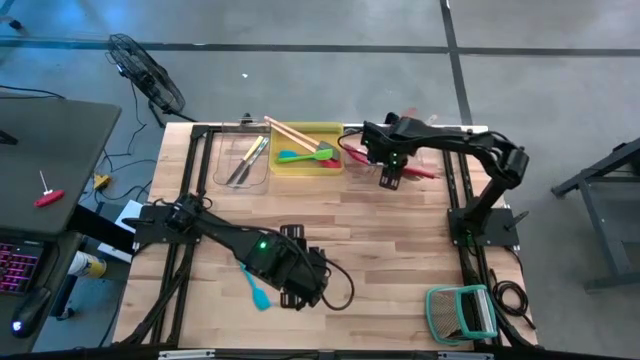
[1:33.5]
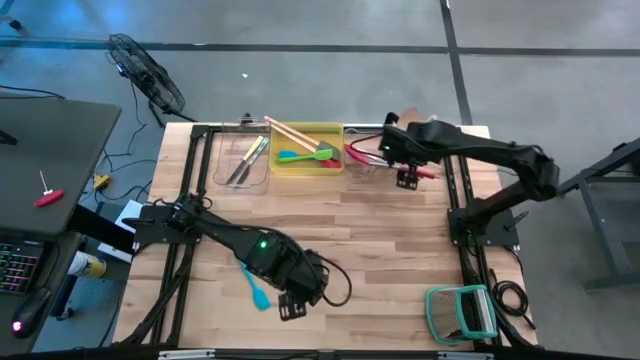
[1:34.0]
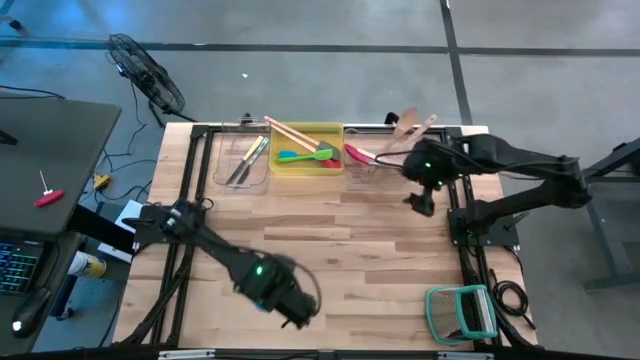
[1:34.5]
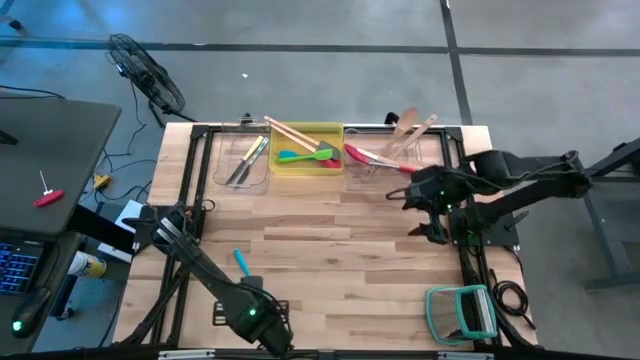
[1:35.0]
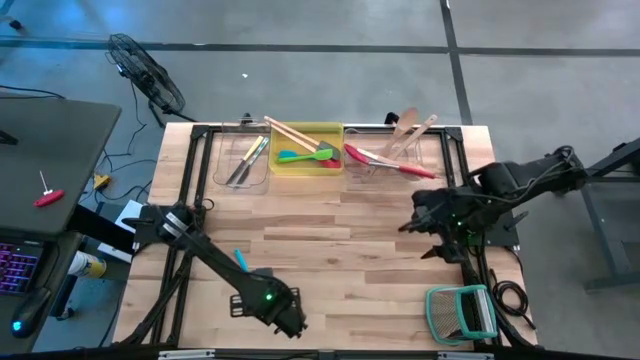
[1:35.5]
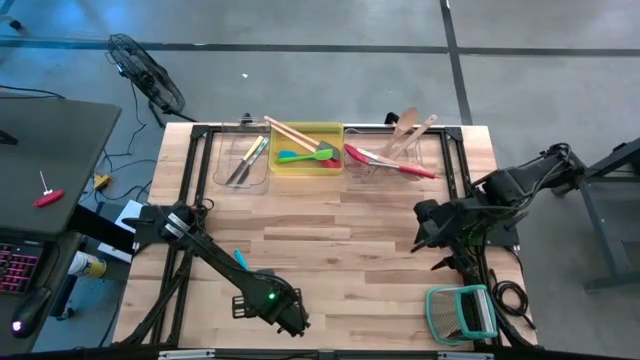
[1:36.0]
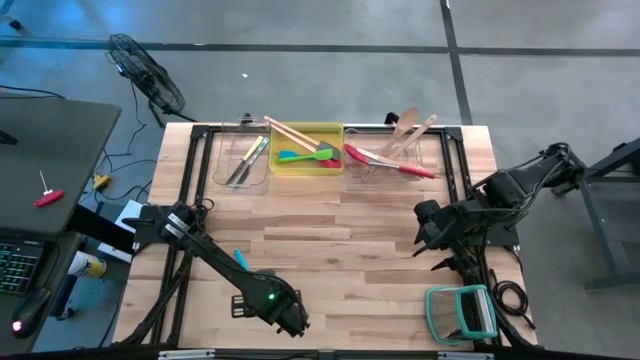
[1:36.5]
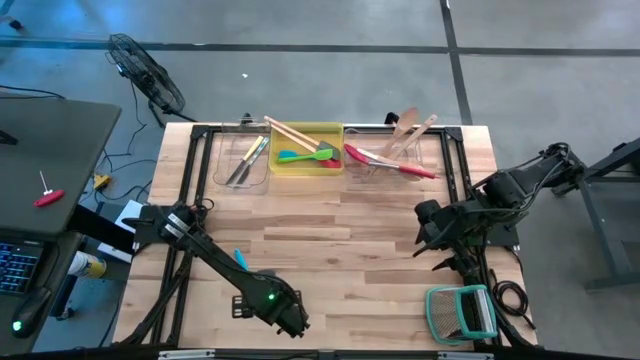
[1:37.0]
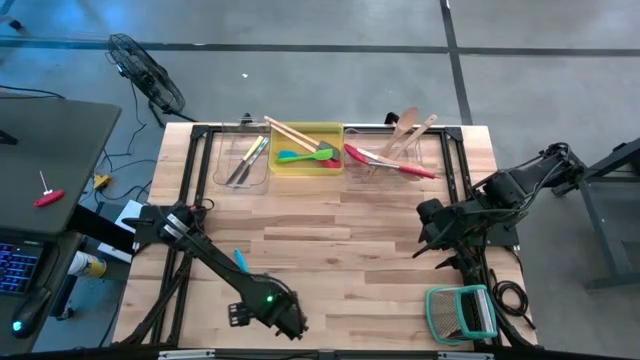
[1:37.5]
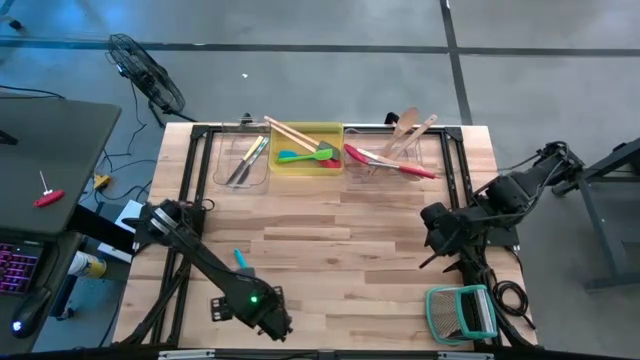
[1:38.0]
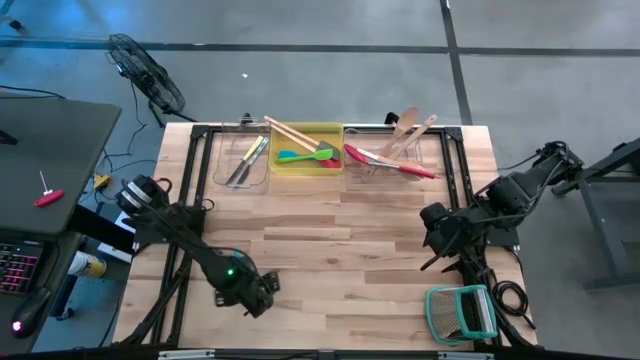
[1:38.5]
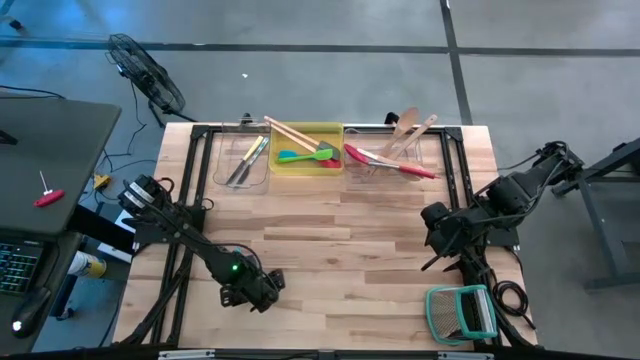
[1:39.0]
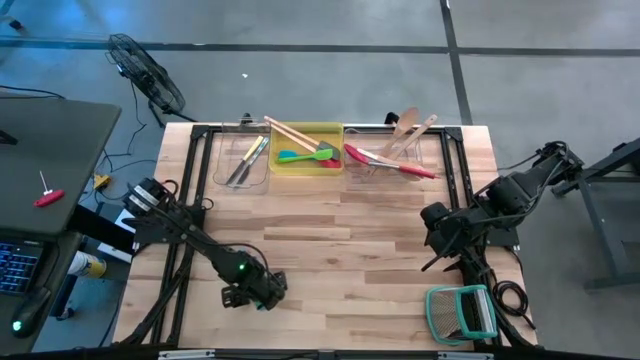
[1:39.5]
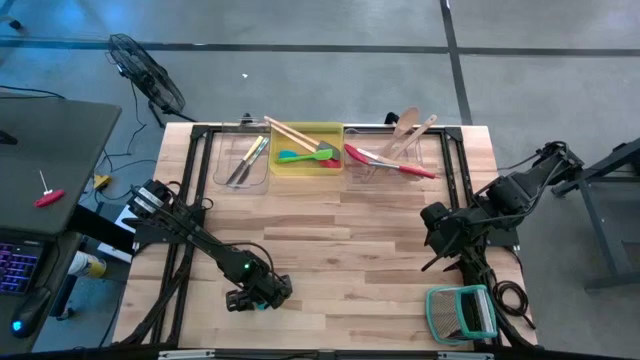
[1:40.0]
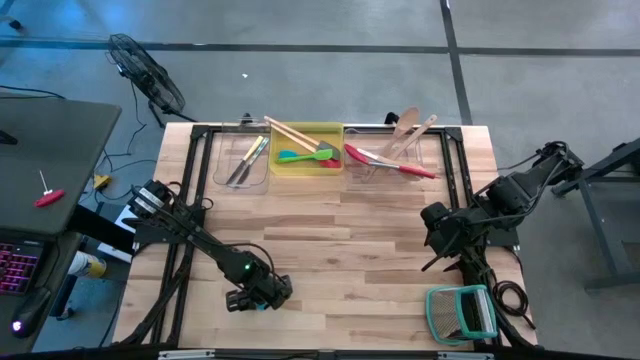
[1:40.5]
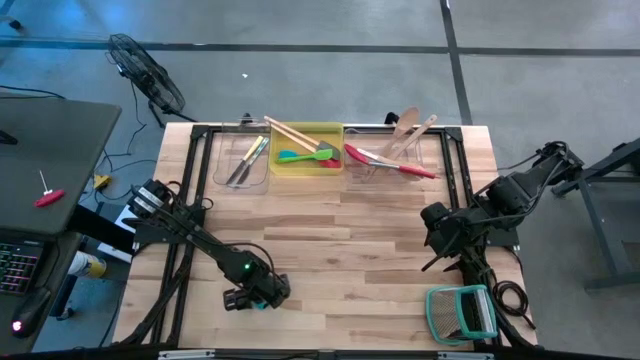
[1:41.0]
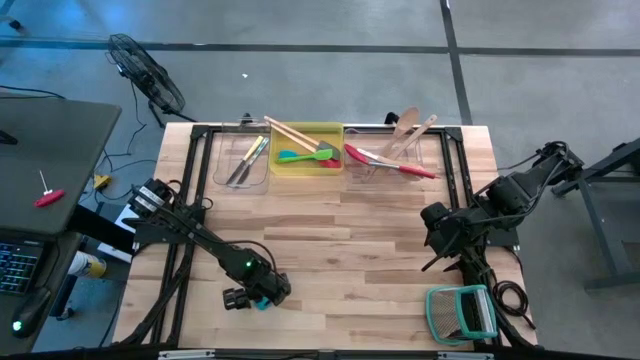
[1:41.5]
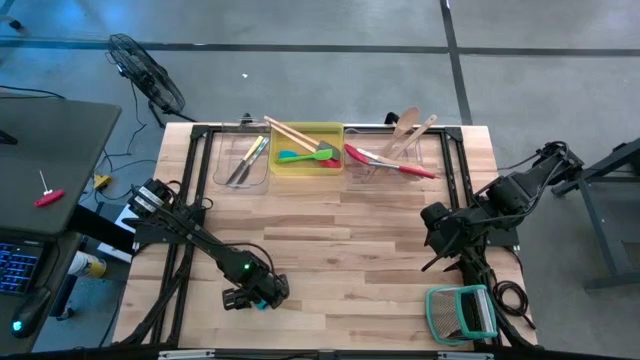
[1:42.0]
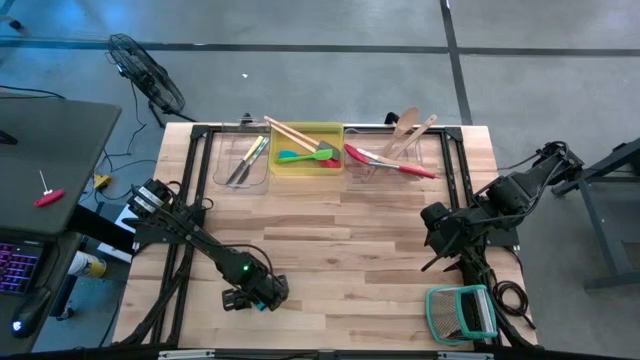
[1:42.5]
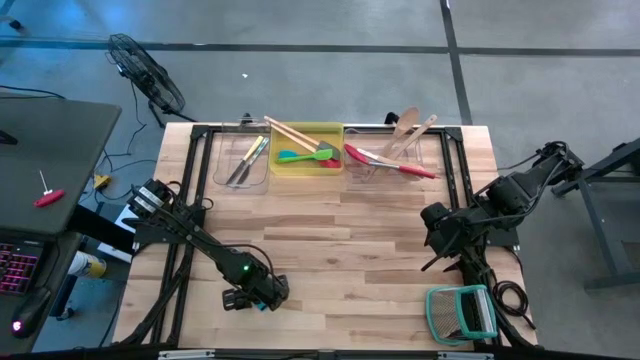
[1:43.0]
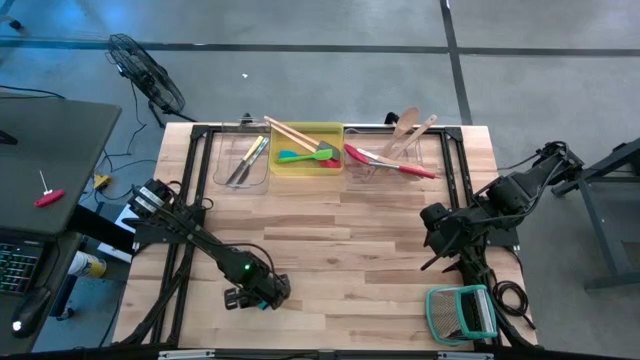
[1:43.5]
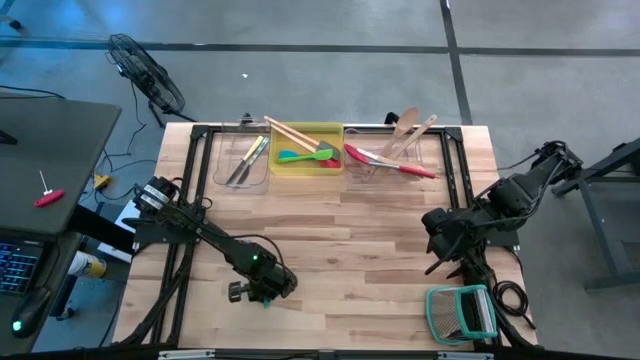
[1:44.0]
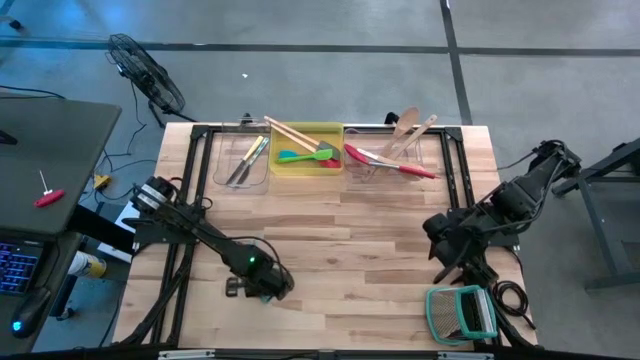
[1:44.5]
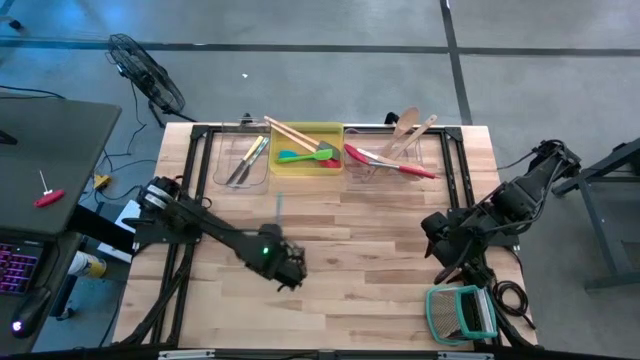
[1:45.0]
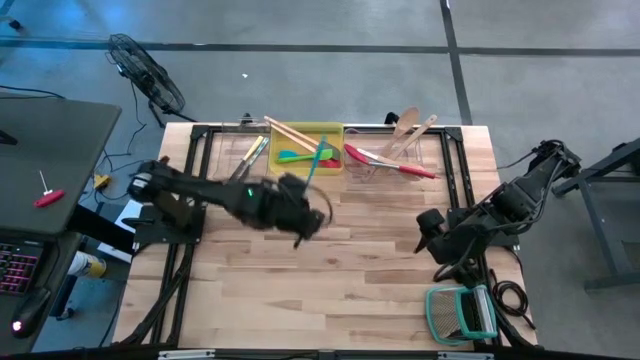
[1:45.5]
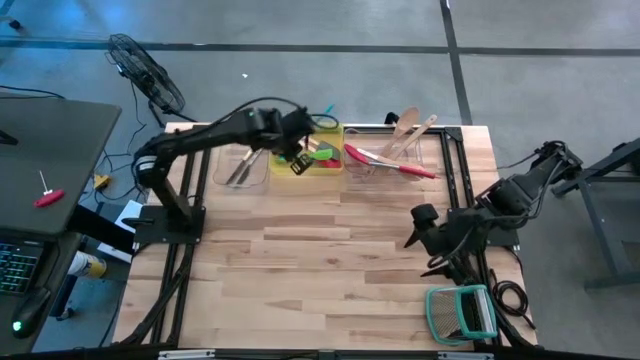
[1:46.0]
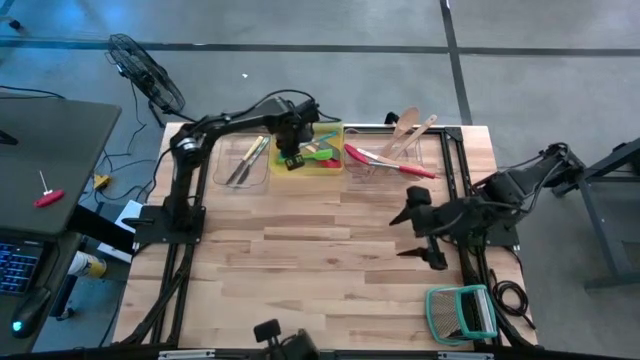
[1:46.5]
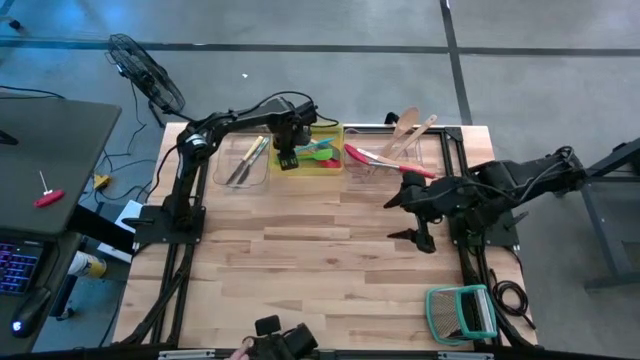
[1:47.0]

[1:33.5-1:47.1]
Task: Pick & Place Kitchen Items
Put the red spatula into the right transparent bin

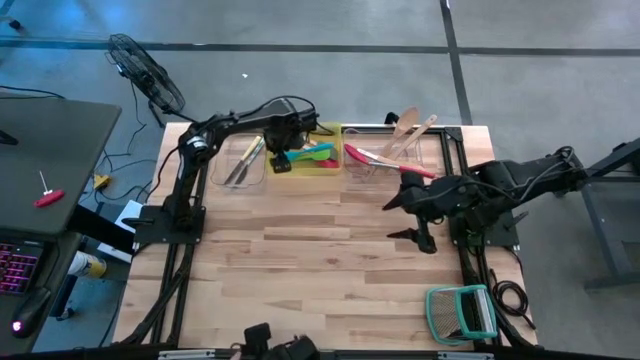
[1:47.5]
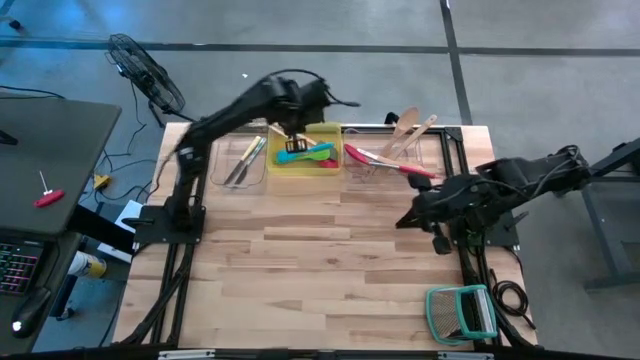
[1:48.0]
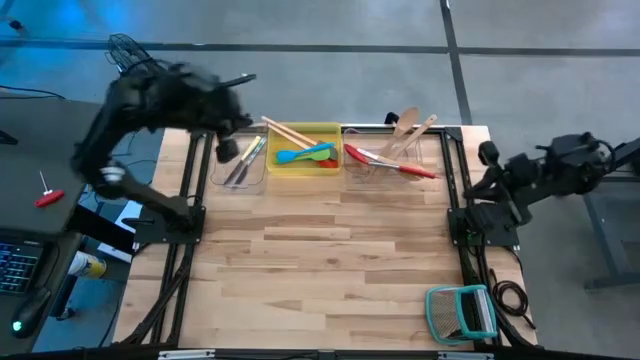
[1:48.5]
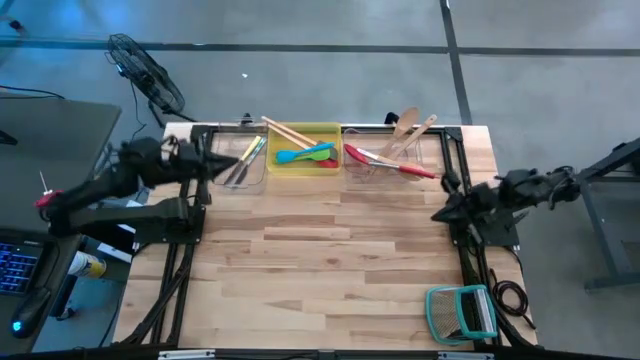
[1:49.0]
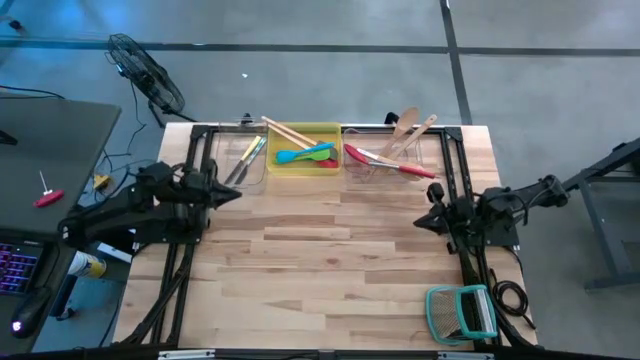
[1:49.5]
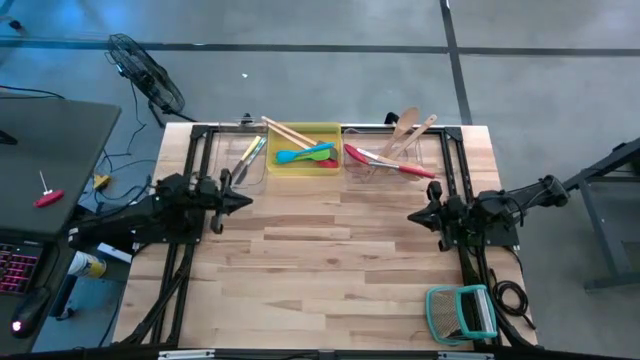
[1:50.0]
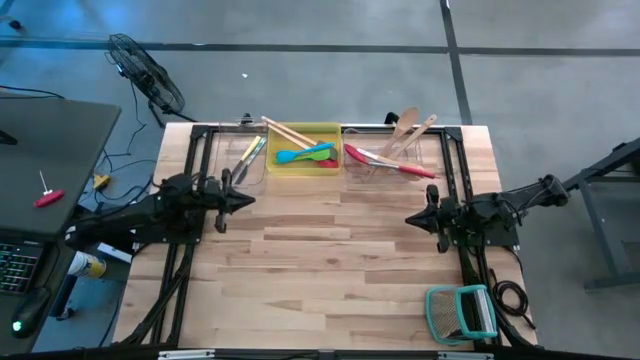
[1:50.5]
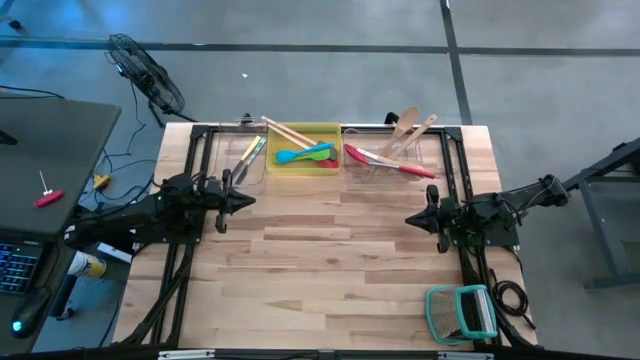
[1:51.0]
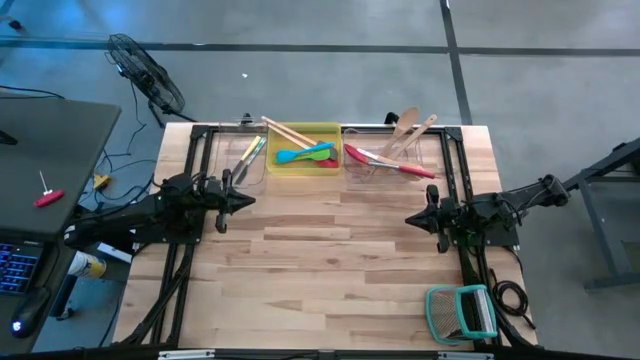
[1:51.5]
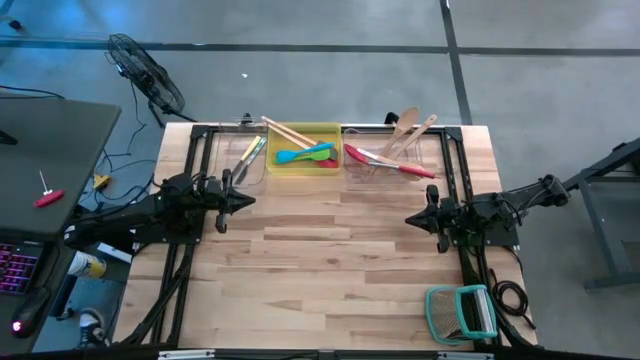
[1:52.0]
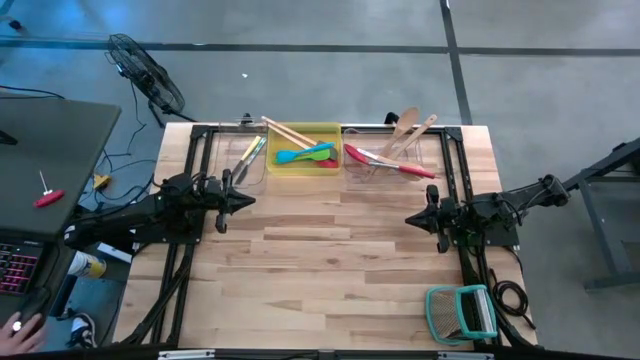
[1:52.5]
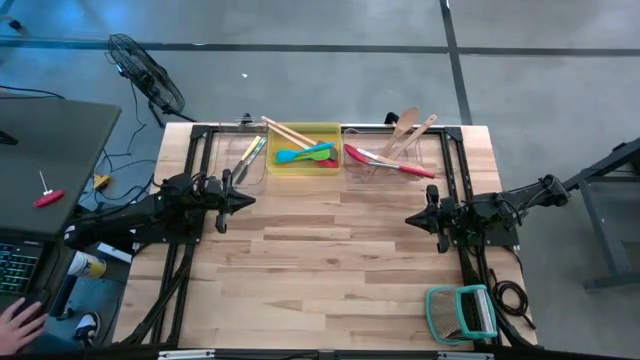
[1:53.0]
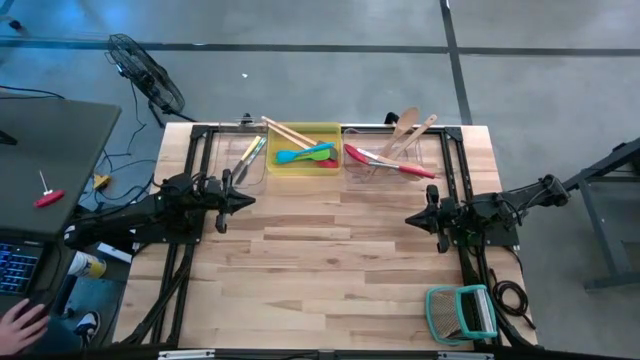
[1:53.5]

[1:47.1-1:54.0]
Return to Home Position
